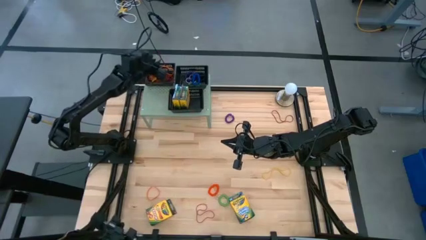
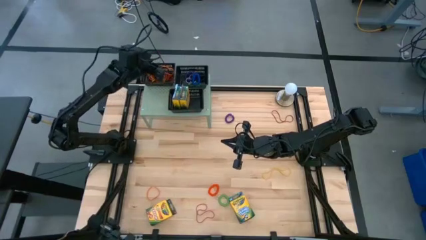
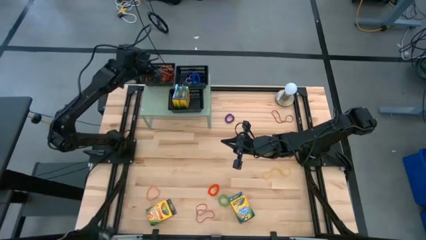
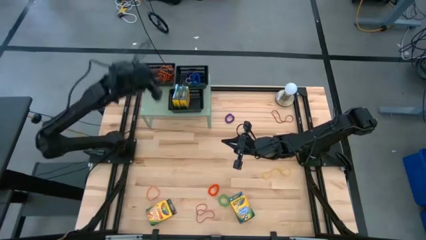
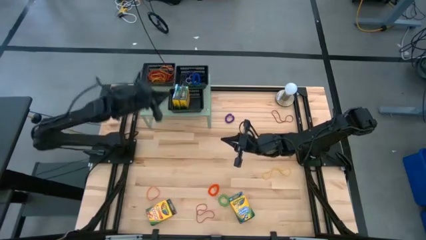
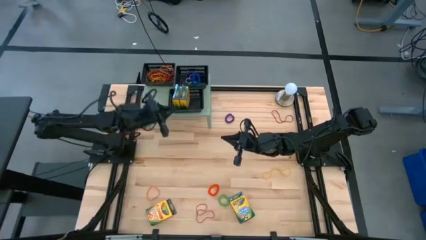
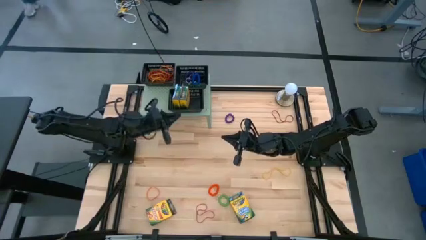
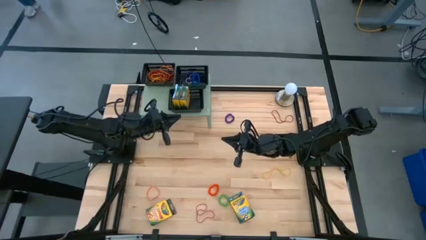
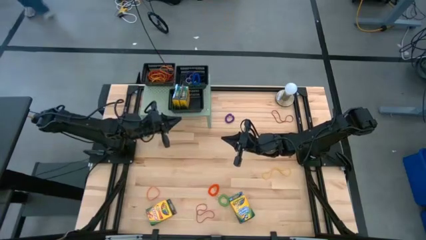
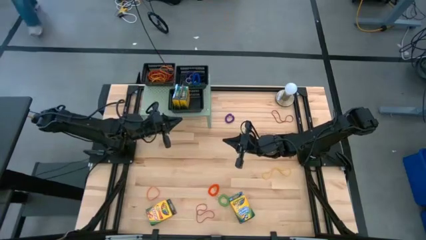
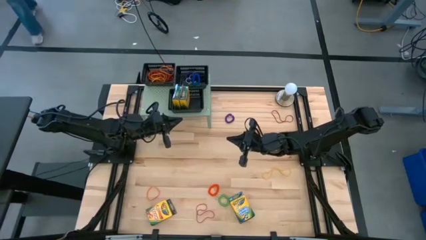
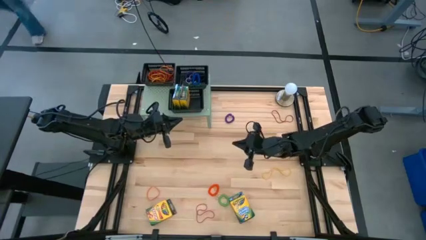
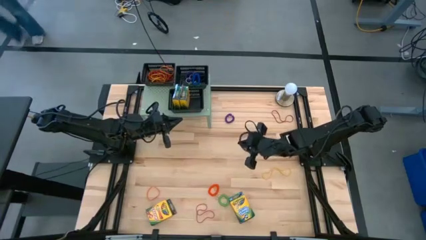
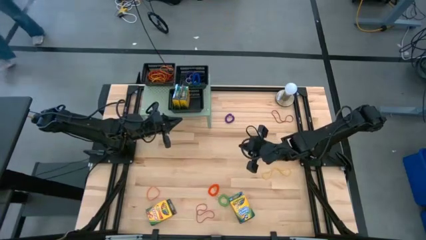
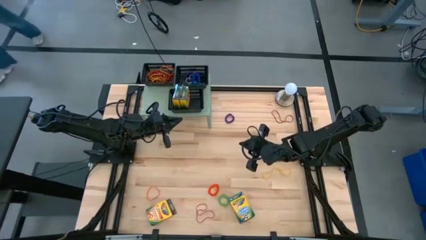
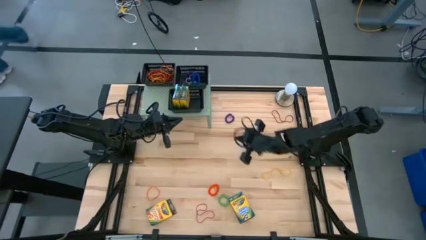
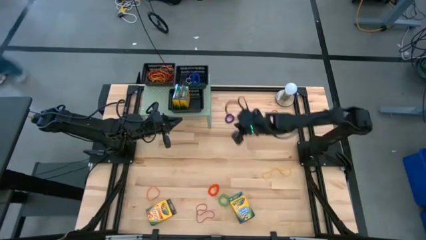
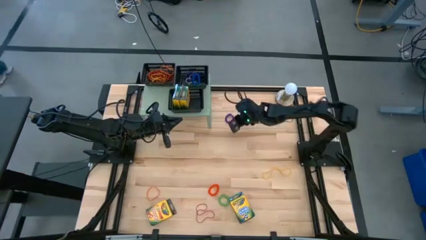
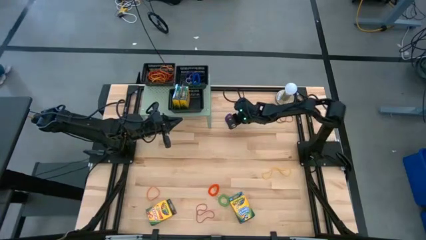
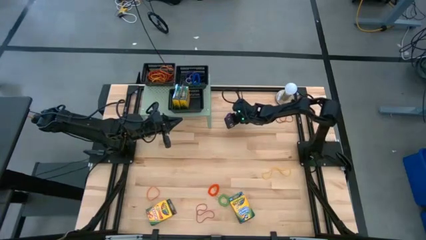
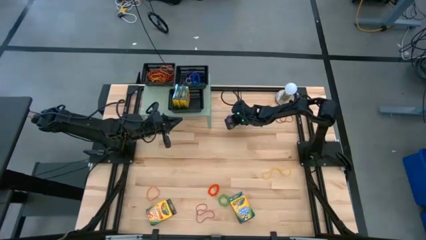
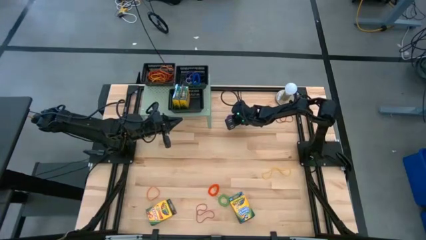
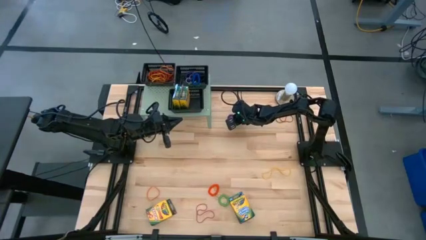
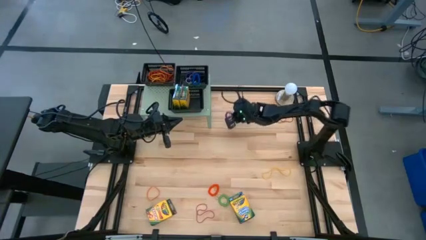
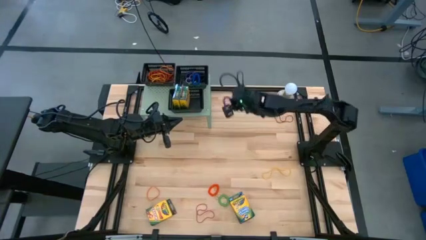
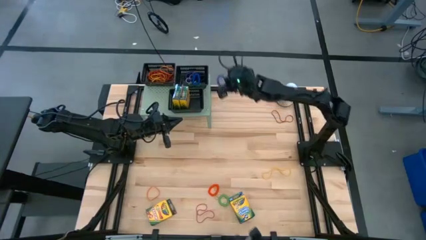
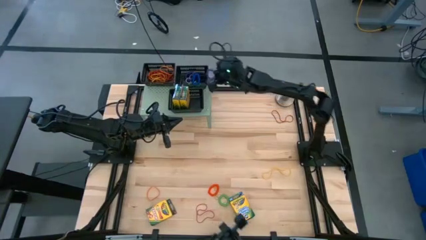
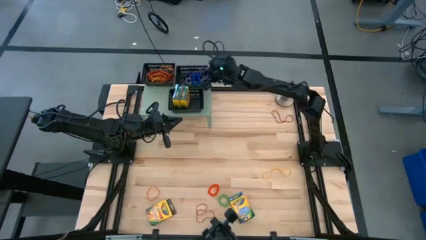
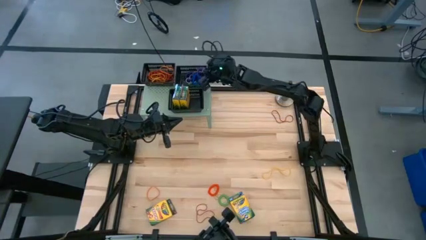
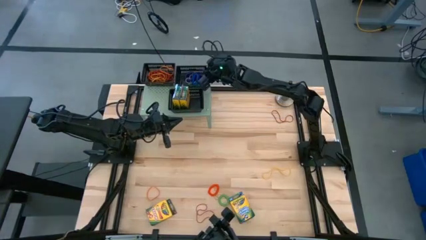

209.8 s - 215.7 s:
Task: Pick & Place Office Desk Supplies
Put the violet spring keychain into the top right black bin on the shelf

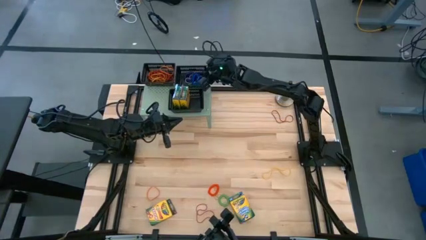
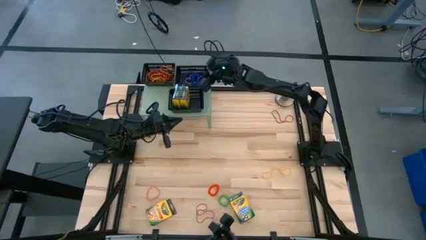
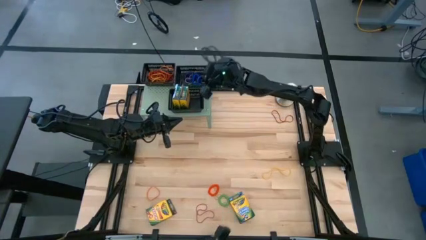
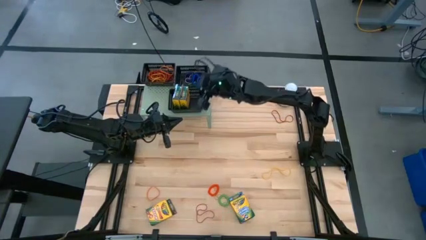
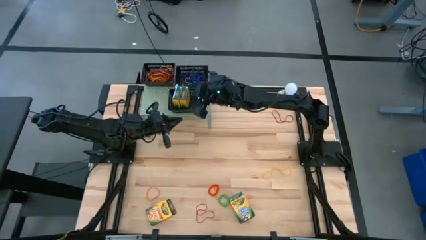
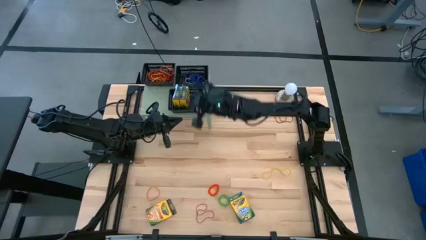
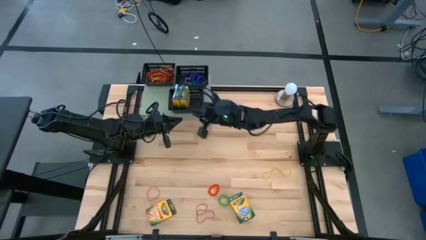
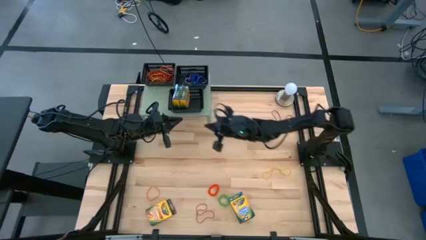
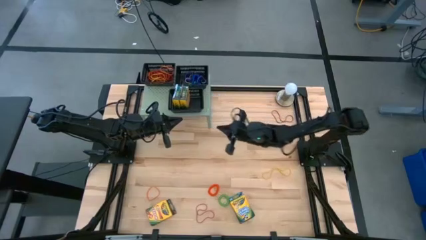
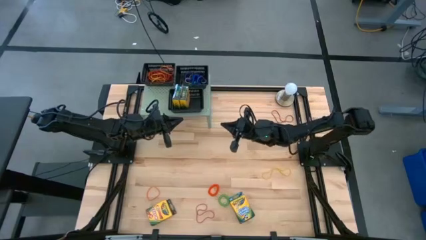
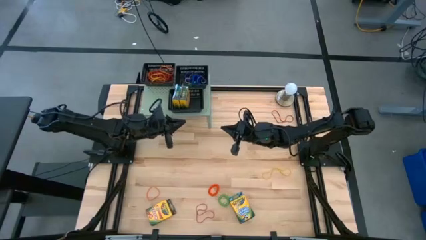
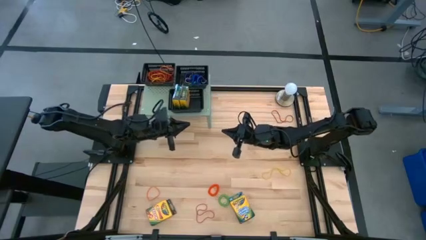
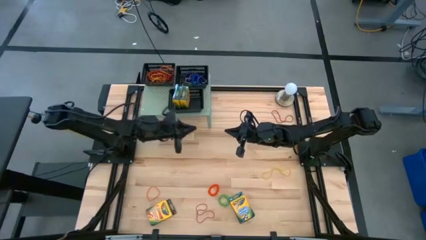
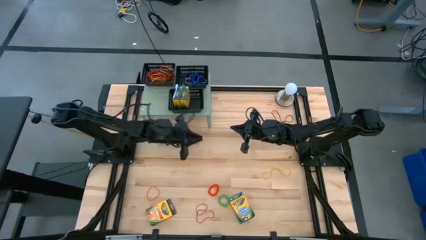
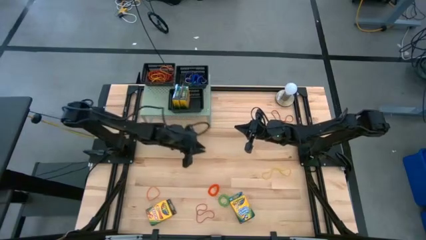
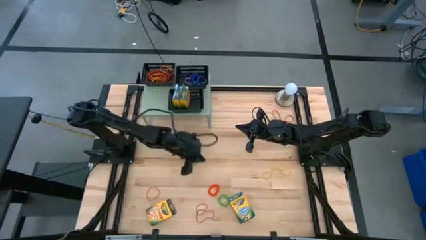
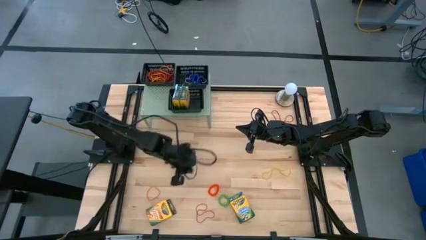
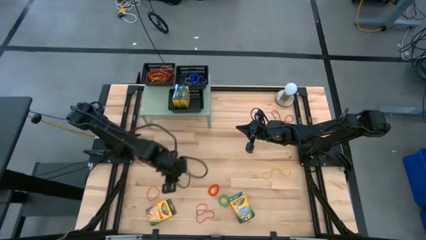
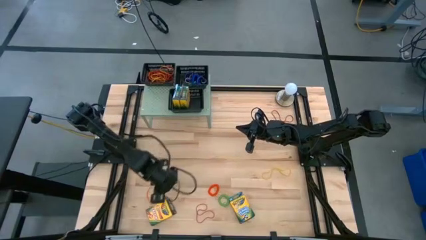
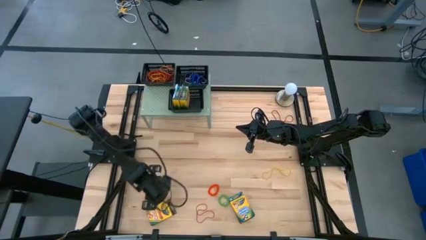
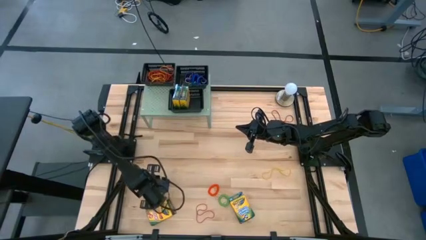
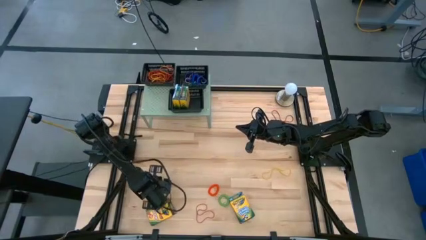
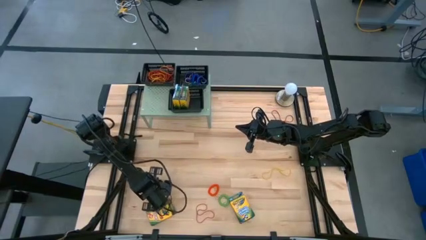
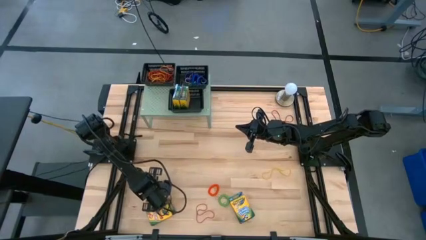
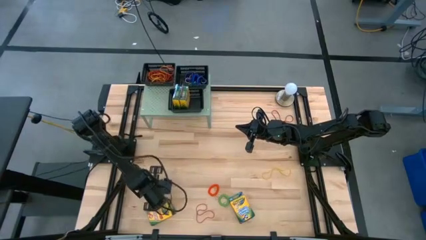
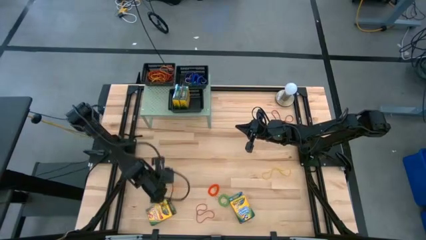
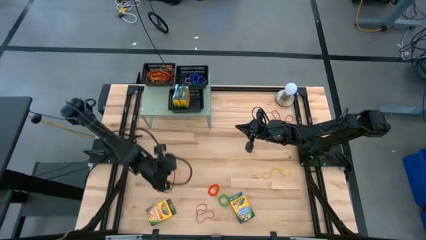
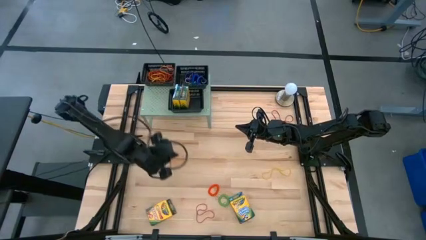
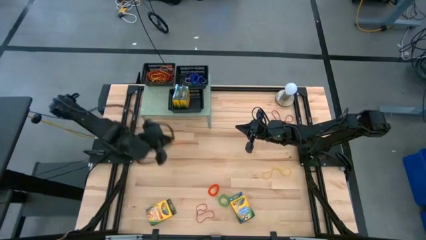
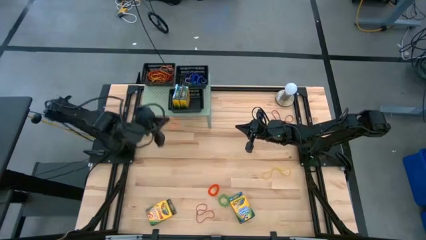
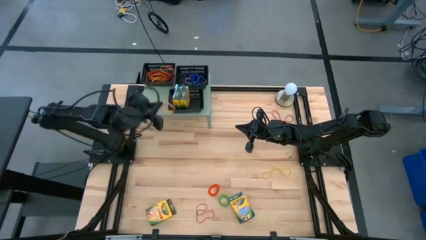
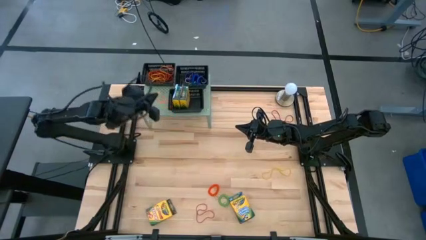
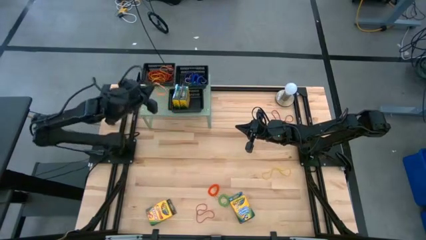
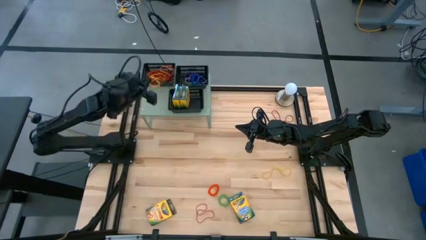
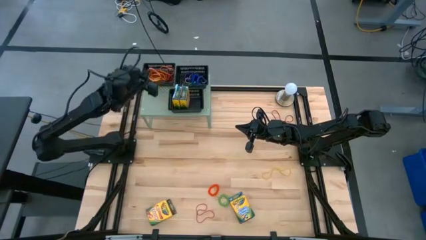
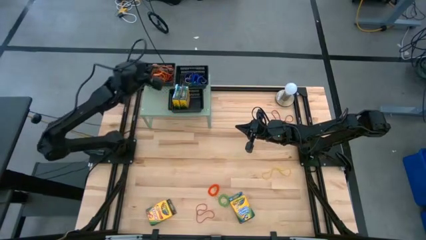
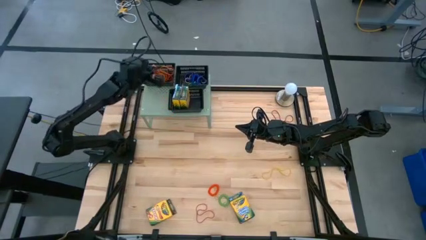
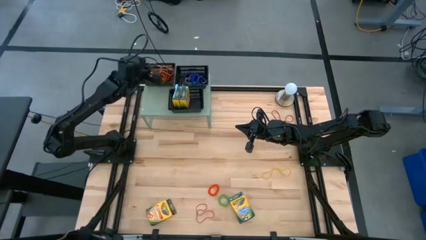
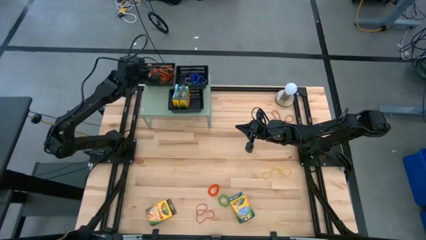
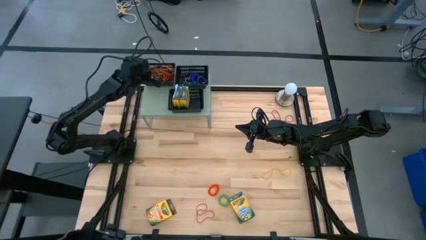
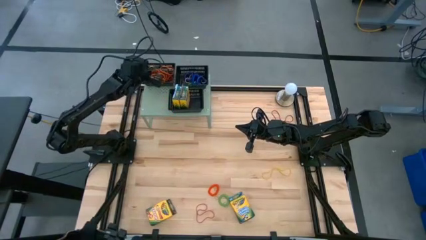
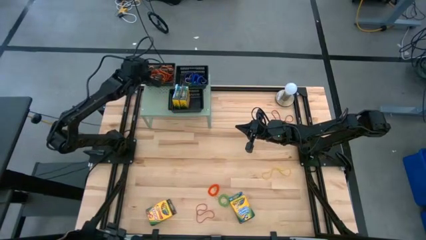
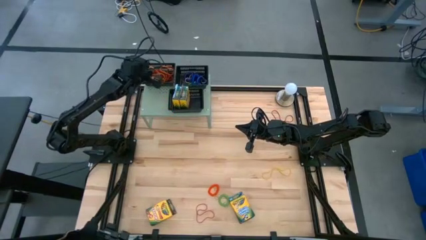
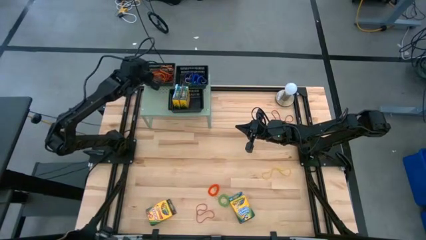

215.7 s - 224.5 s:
Put the orange rubber band into the top left black bin on the shelf
